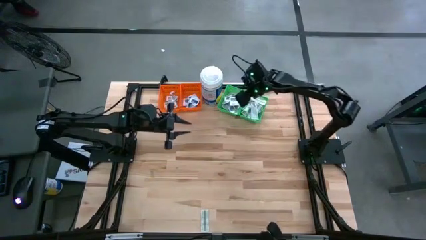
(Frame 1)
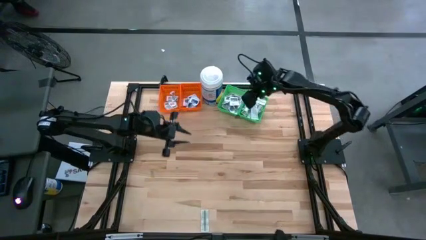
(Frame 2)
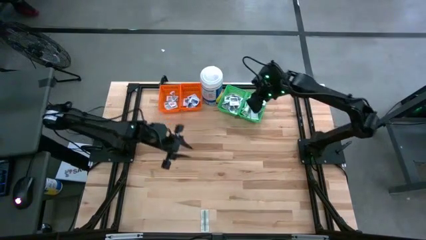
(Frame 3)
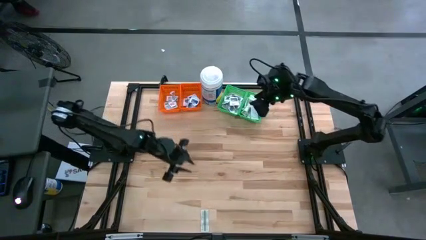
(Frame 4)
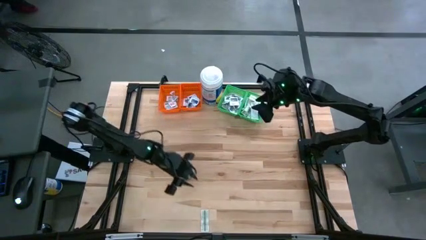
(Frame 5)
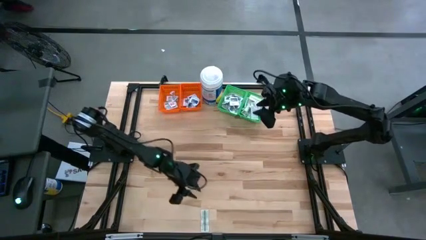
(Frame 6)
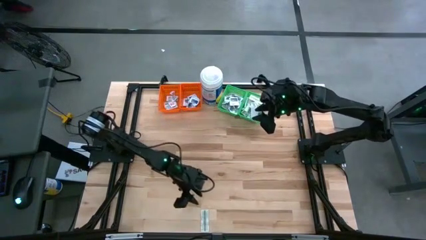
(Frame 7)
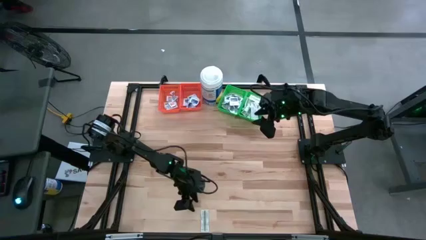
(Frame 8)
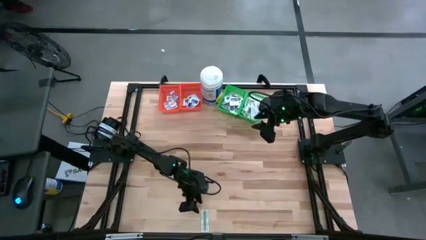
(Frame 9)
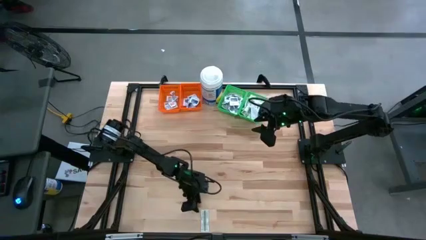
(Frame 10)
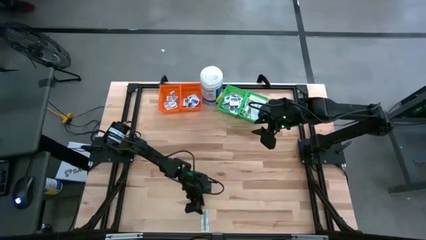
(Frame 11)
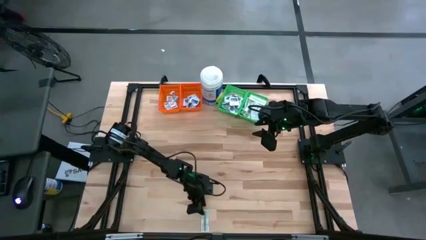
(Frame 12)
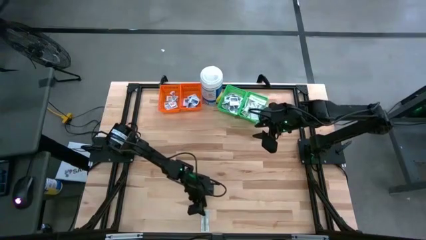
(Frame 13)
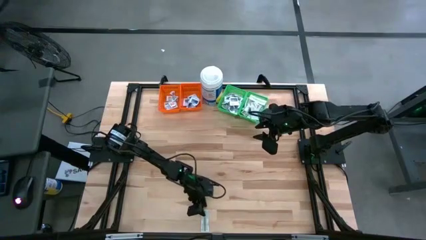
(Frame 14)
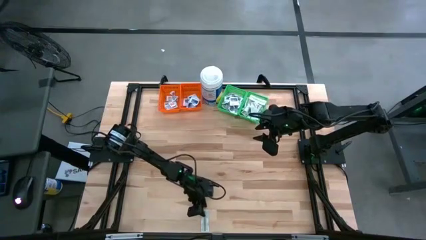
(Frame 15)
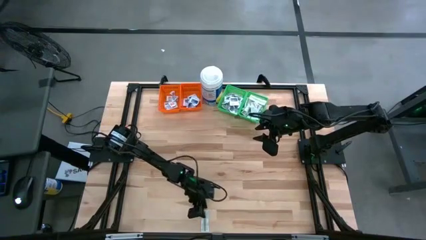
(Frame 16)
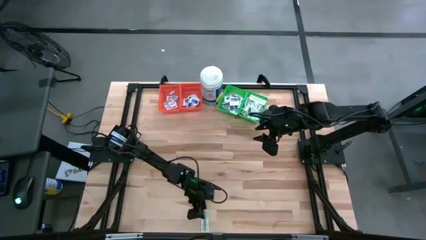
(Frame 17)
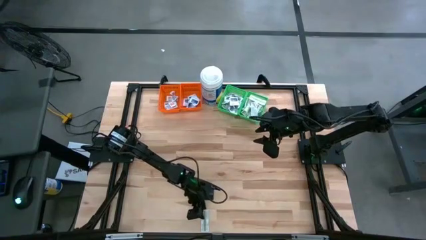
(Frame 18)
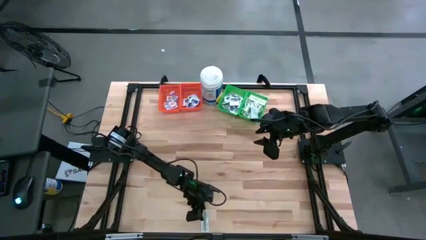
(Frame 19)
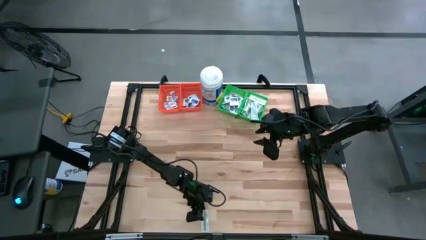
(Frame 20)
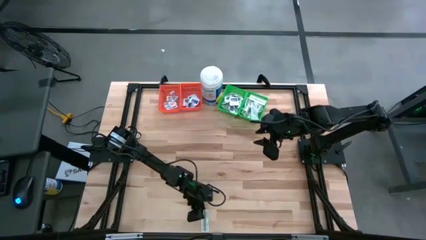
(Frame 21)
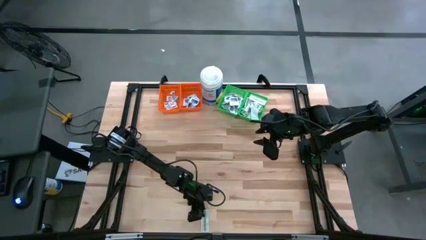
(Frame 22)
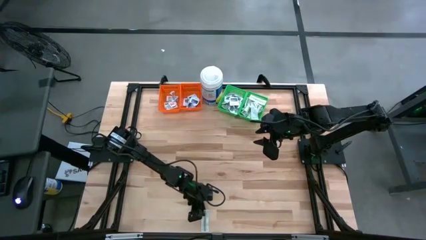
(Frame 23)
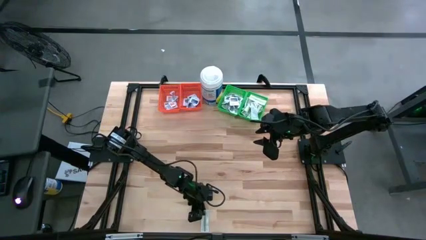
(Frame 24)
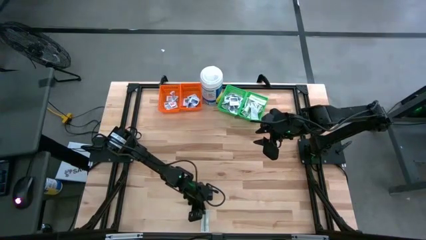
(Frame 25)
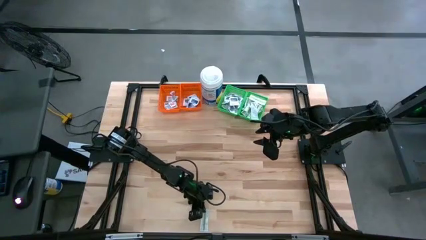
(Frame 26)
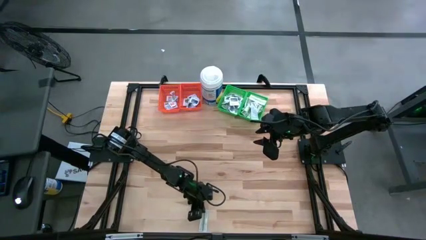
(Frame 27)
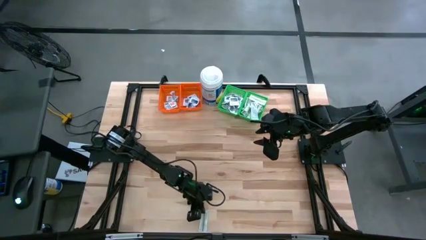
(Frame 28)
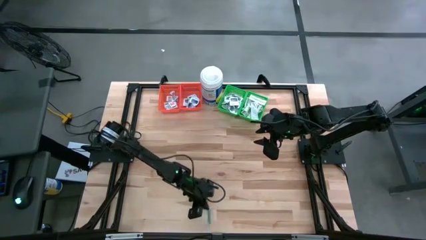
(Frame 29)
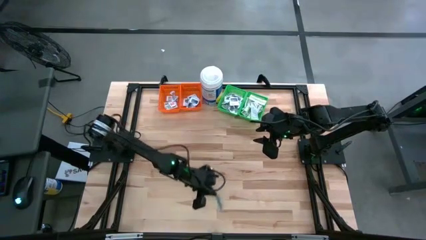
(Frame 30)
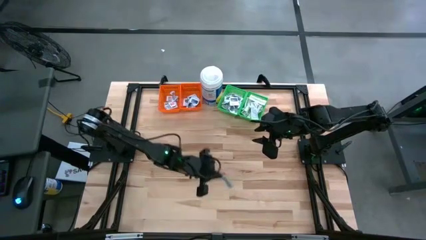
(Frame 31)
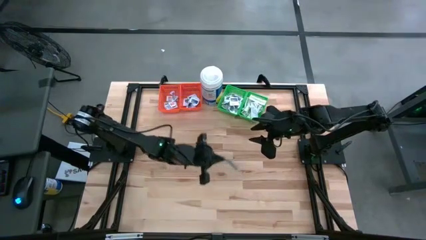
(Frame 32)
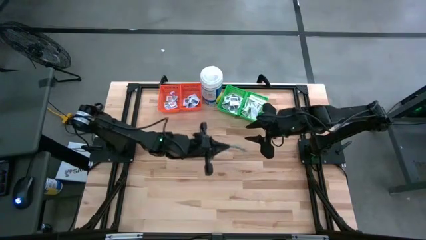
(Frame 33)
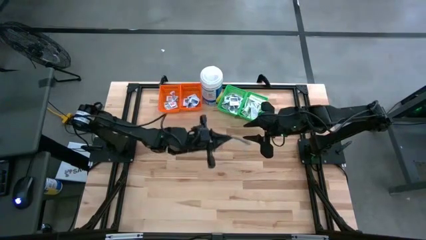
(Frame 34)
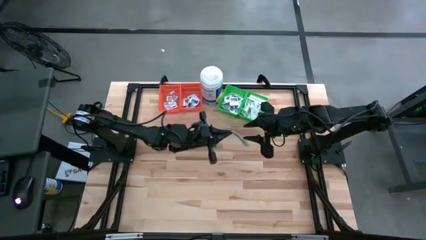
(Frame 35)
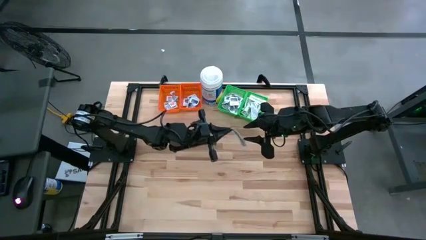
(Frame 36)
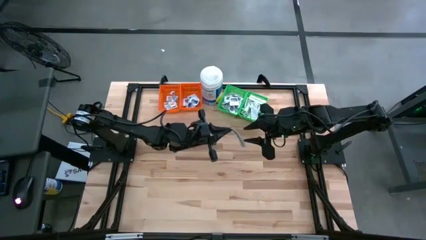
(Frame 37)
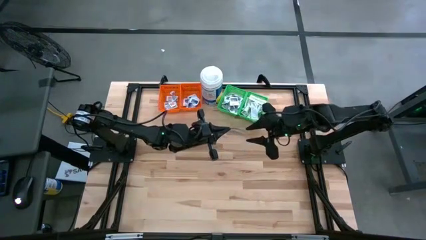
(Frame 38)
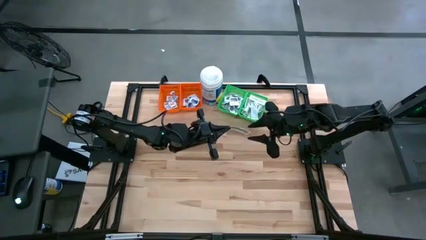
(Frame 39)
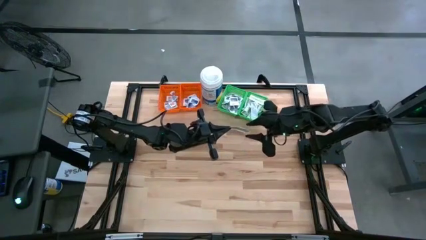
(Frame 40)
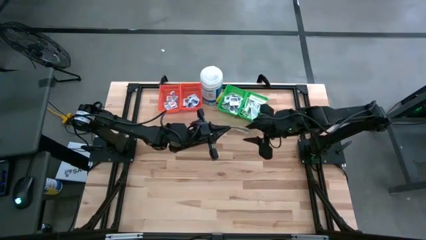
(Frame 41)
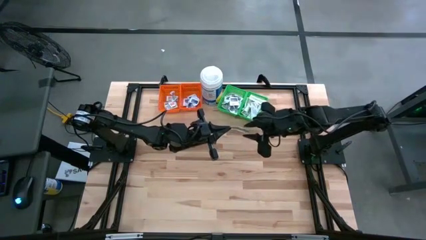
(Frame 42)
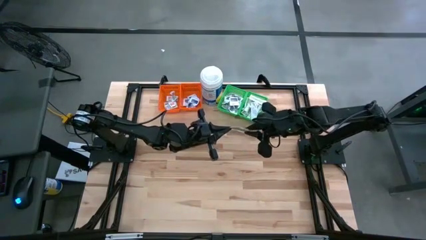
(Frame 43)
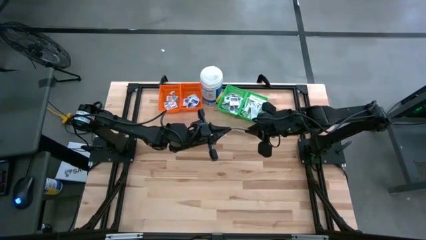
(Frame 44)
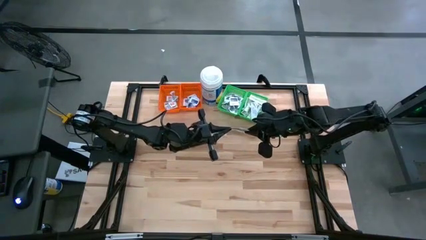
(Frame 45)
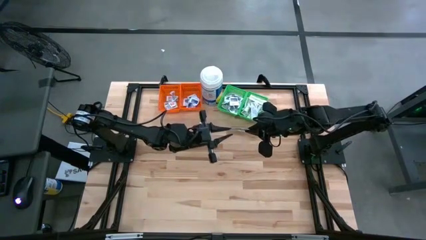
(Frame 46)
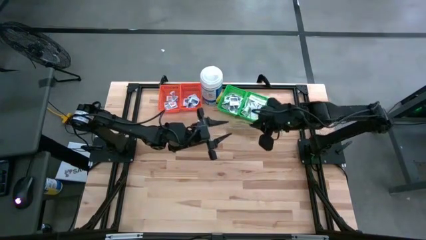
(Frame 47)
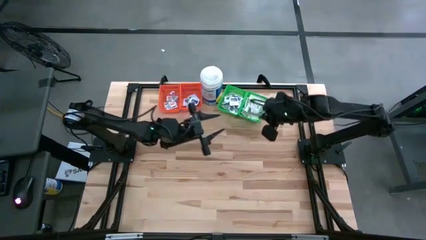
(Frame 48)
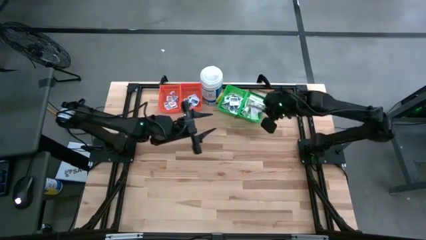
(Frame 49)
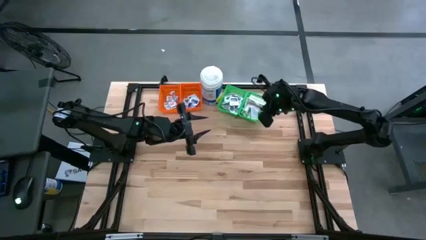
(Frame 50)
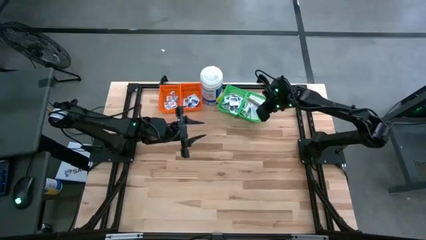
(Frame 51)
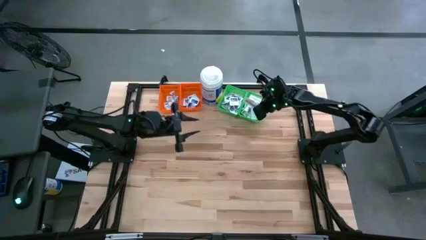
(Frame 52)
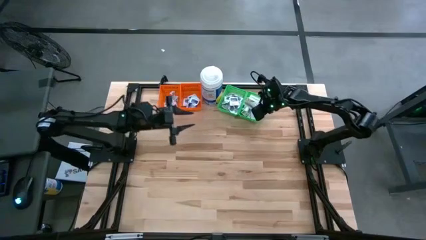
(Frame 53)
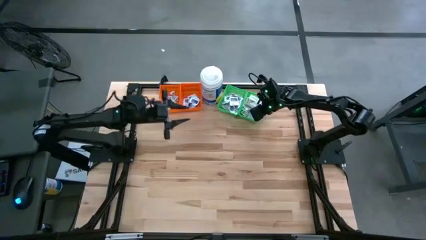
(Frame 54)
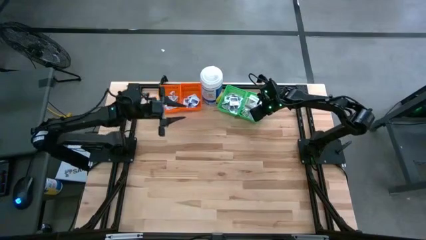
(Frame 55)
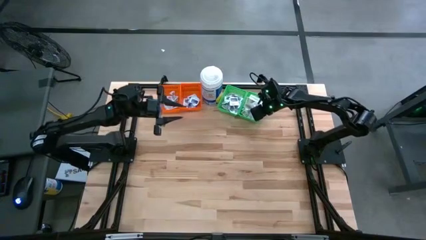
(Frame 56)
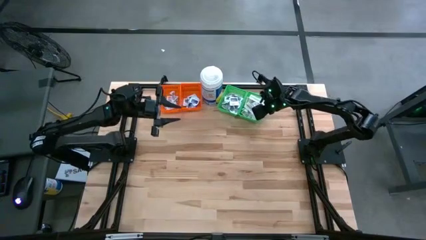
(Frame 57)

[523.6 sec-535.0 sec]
Task: Pick & Place First Aid Supplies
Put the green bandage pack into the right green bin

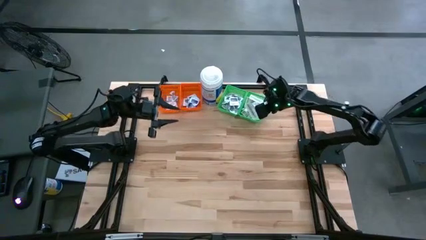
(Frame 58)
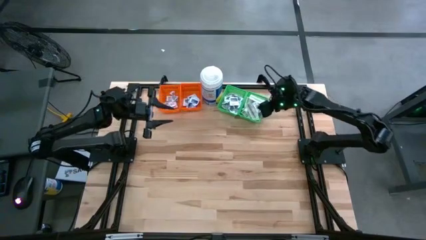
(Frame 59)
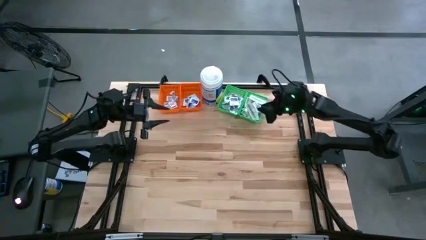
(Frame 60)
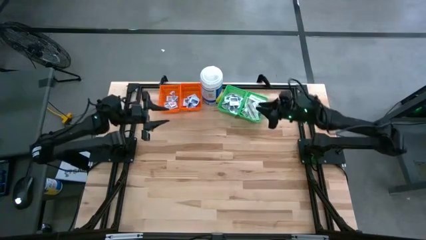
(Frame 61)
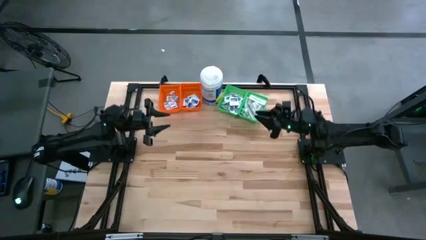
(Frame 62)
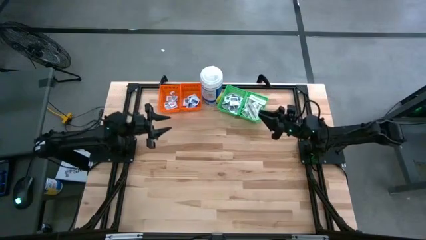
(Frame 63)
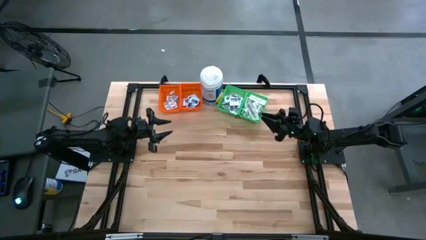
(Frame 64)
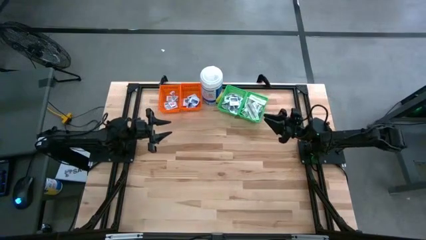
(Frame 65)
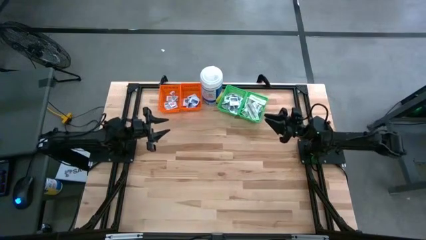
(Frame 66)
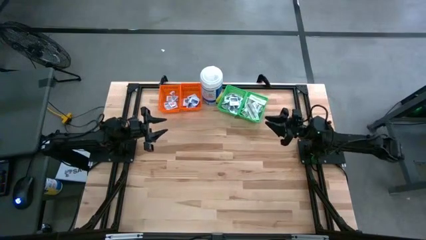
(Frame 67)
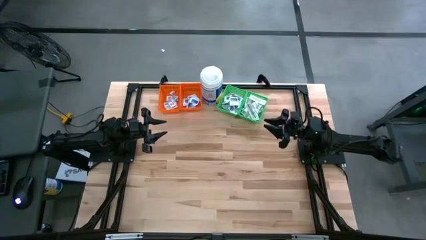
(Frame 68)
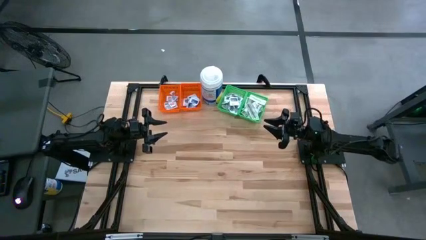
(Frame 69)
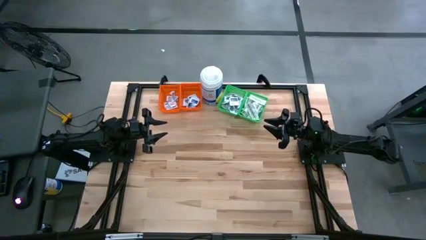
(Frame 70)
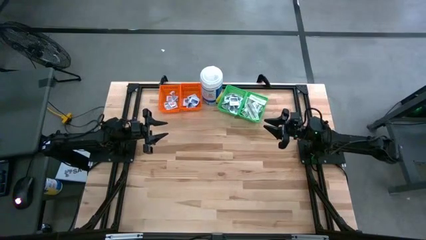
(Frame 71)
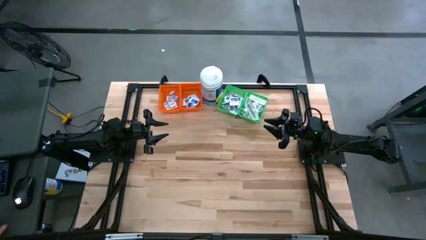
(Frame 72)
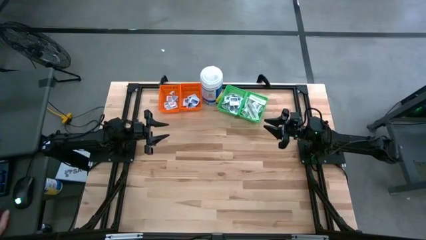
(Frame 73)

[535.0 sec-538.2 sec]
Return to Home Position
